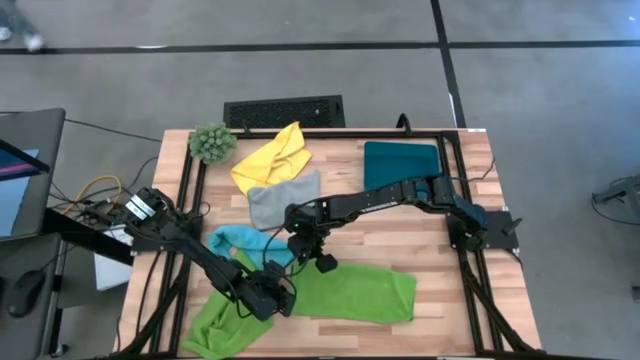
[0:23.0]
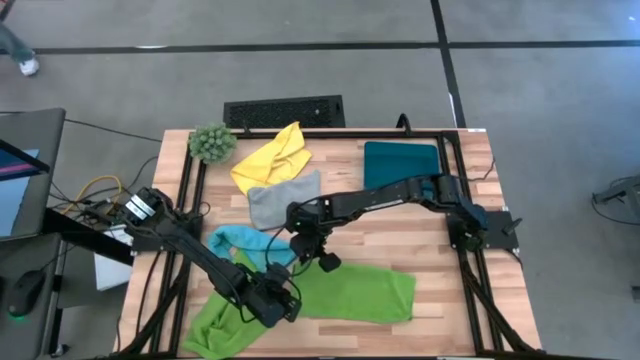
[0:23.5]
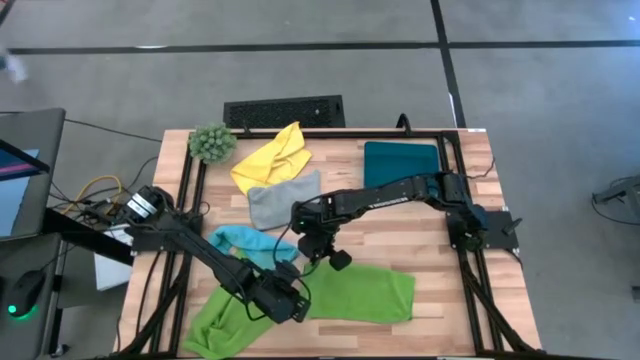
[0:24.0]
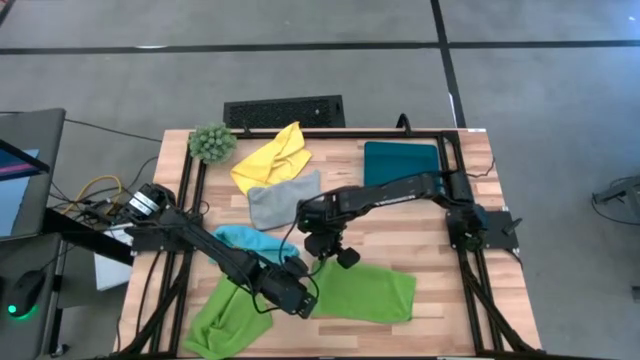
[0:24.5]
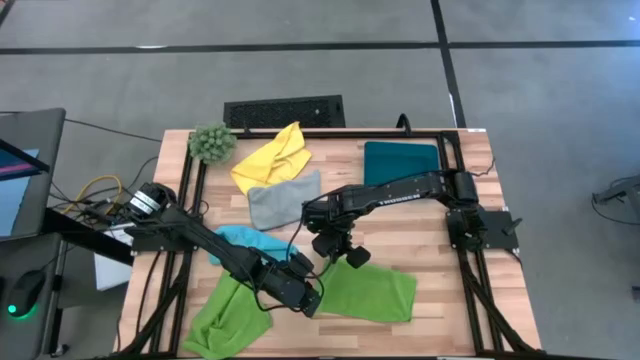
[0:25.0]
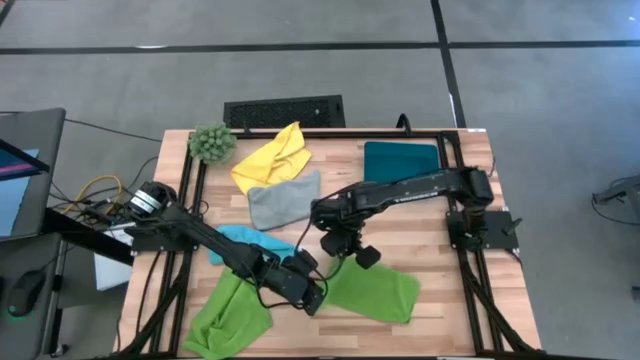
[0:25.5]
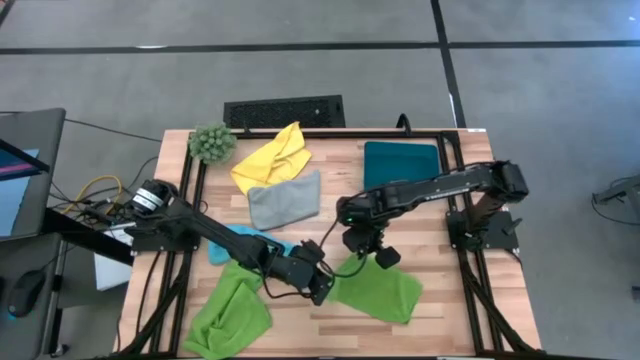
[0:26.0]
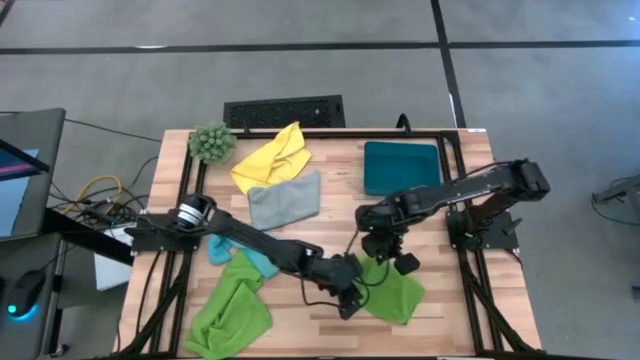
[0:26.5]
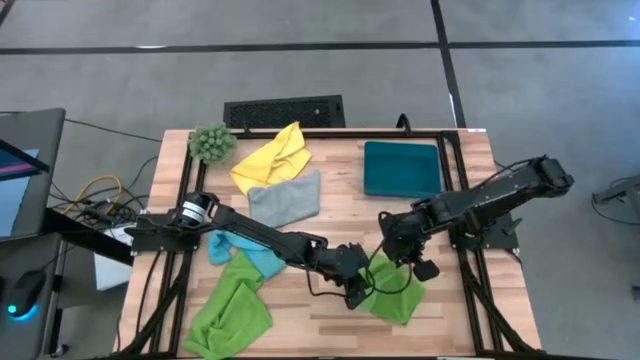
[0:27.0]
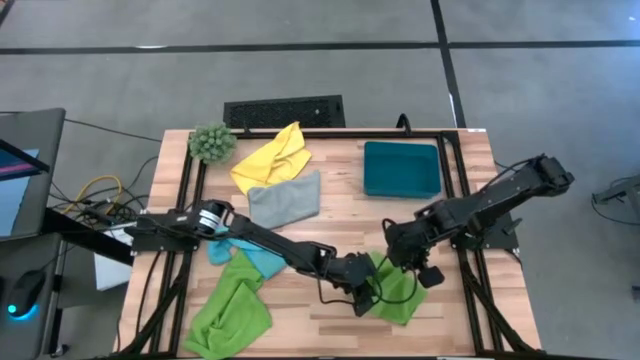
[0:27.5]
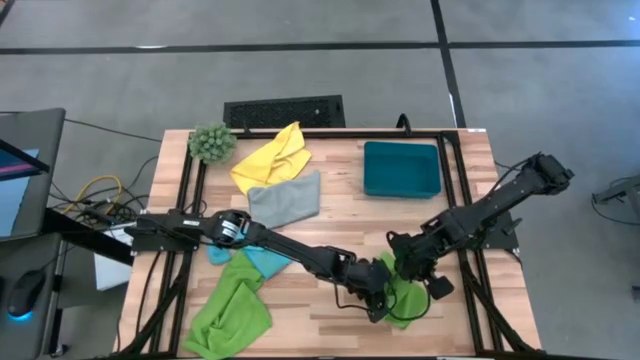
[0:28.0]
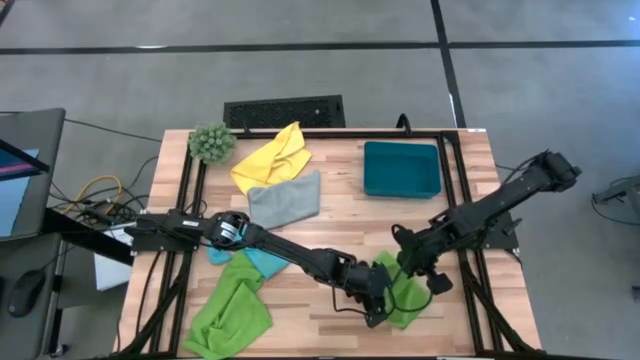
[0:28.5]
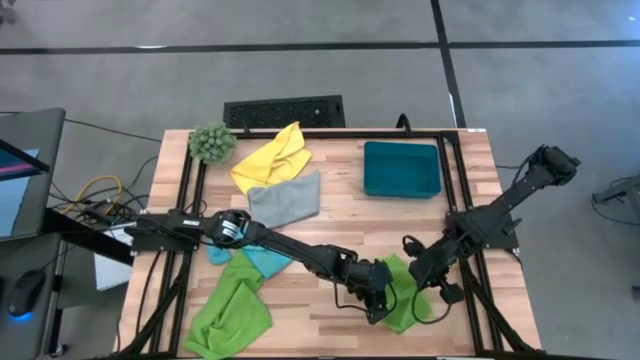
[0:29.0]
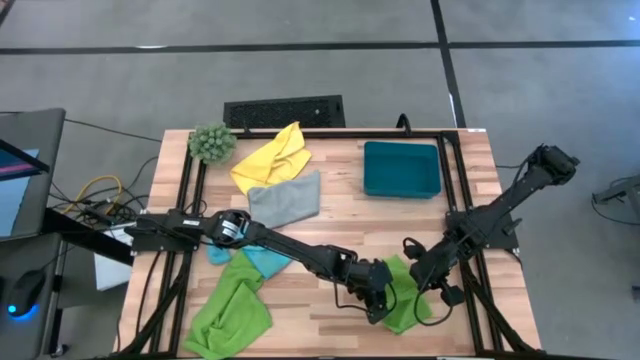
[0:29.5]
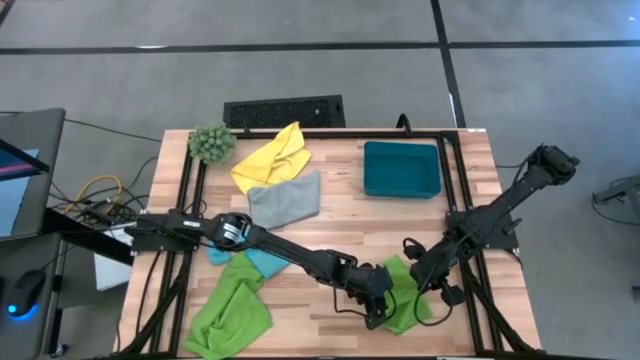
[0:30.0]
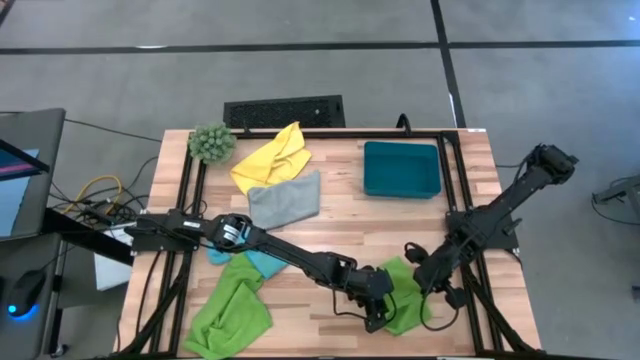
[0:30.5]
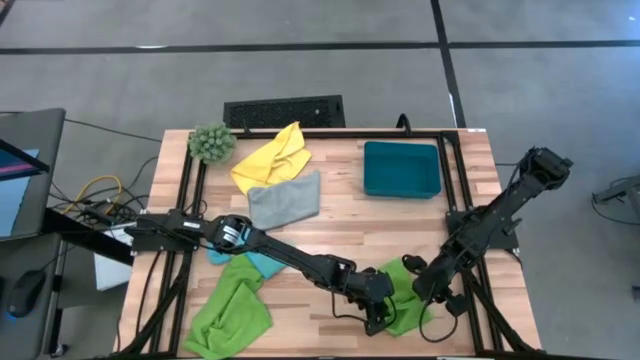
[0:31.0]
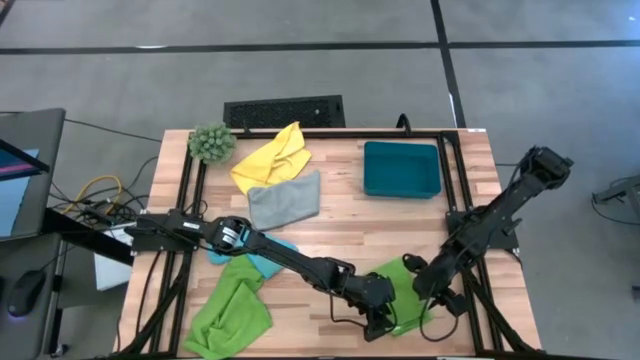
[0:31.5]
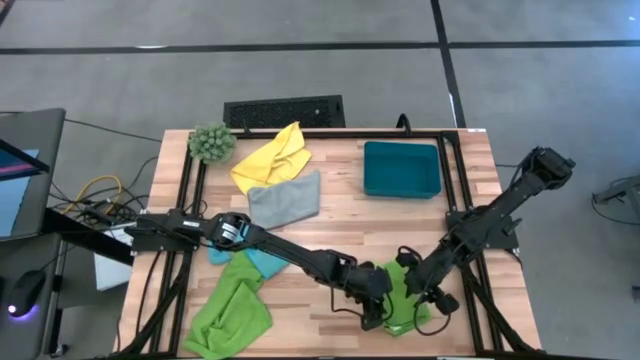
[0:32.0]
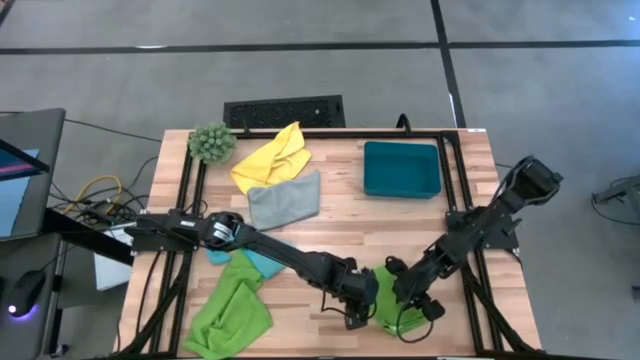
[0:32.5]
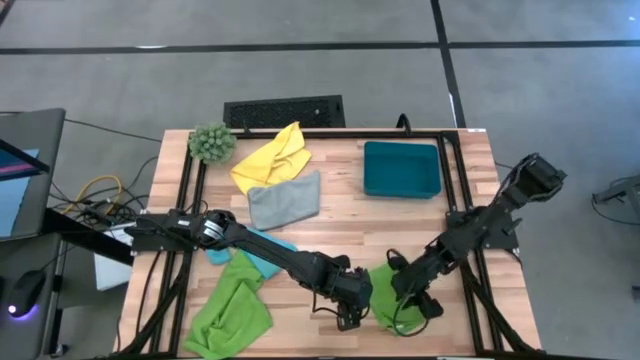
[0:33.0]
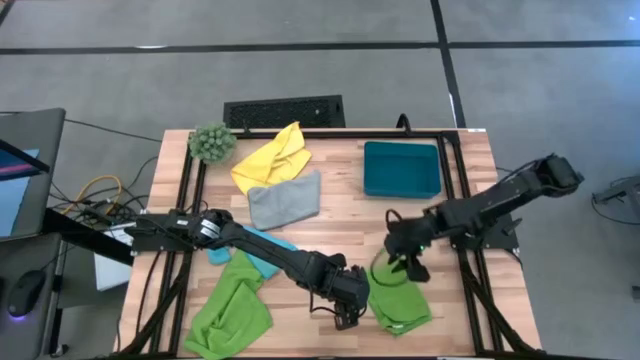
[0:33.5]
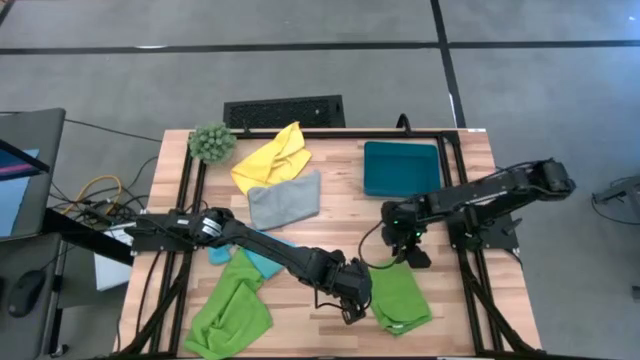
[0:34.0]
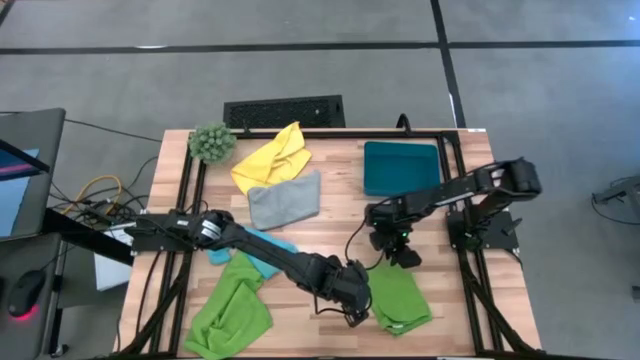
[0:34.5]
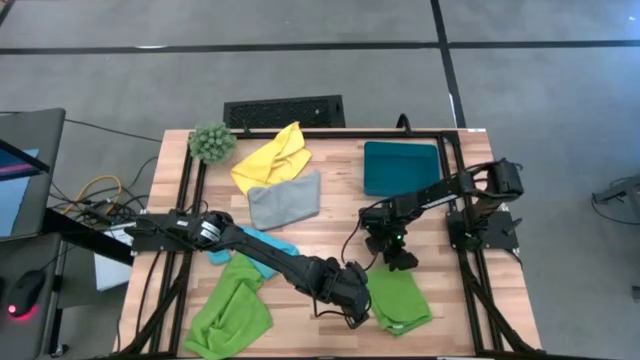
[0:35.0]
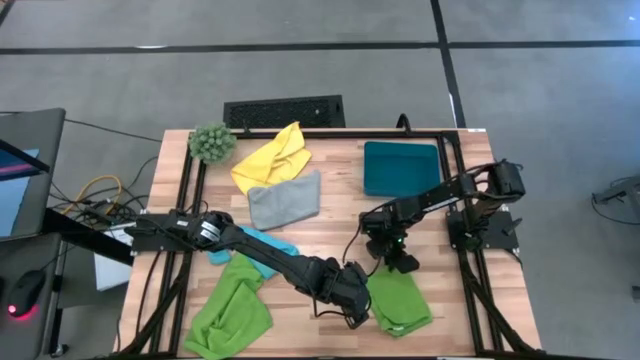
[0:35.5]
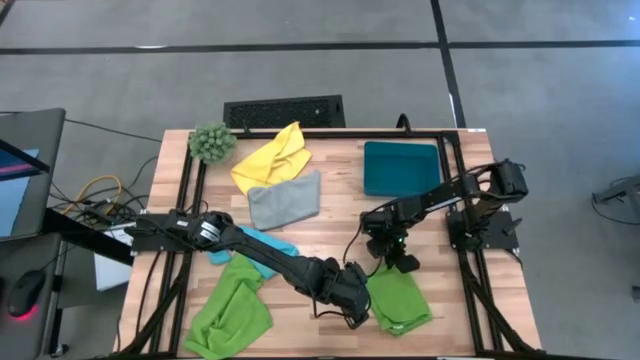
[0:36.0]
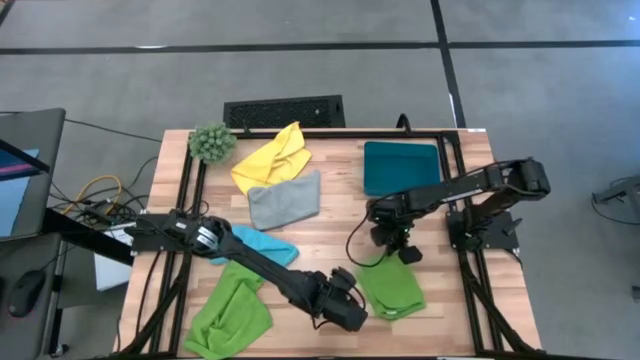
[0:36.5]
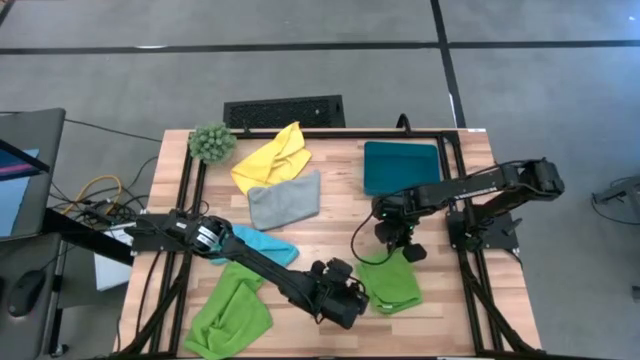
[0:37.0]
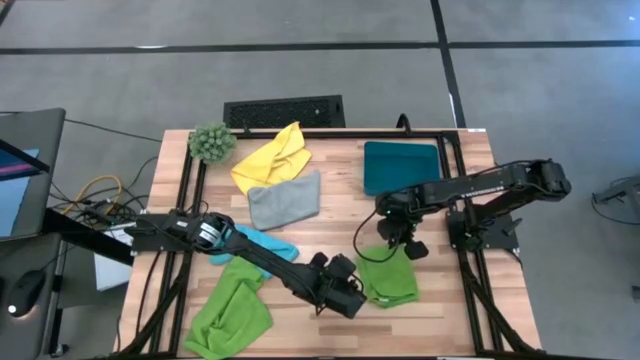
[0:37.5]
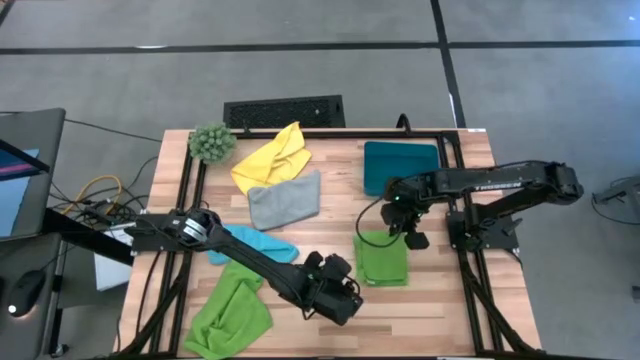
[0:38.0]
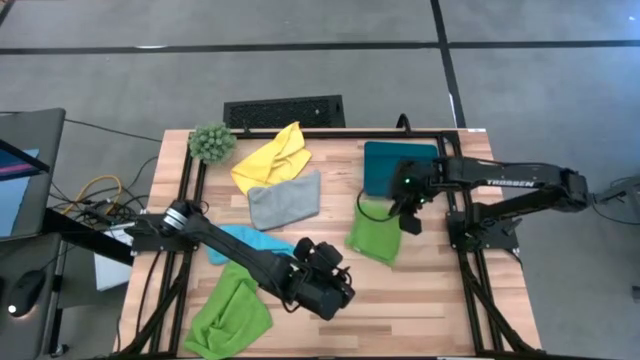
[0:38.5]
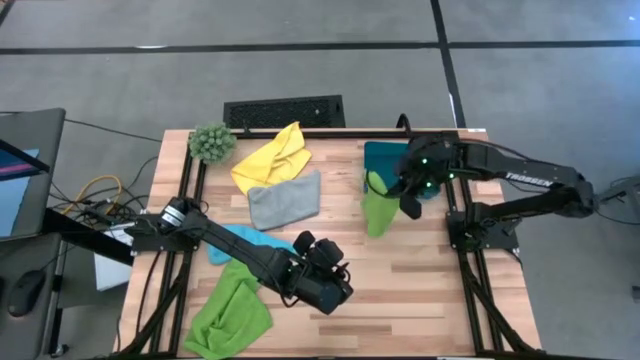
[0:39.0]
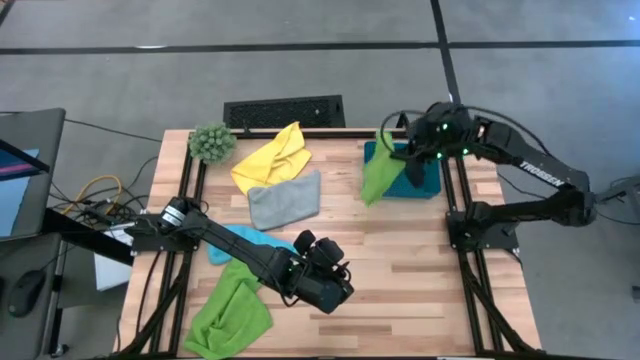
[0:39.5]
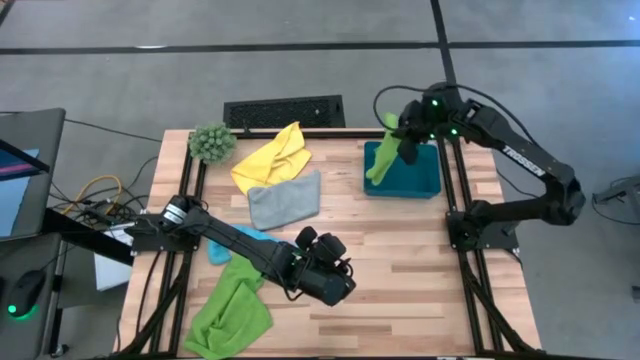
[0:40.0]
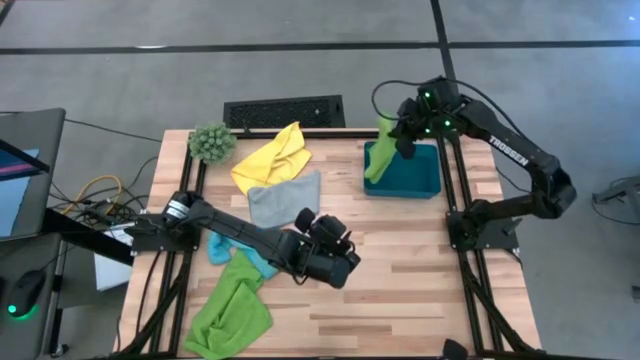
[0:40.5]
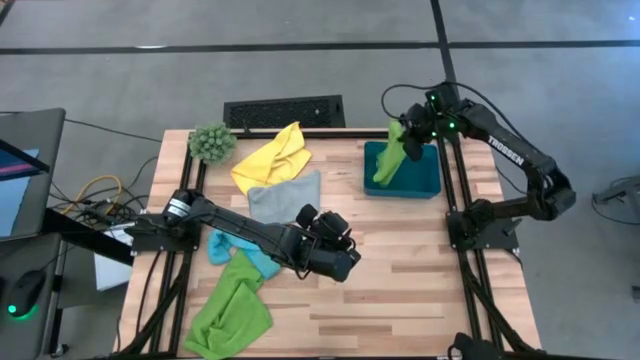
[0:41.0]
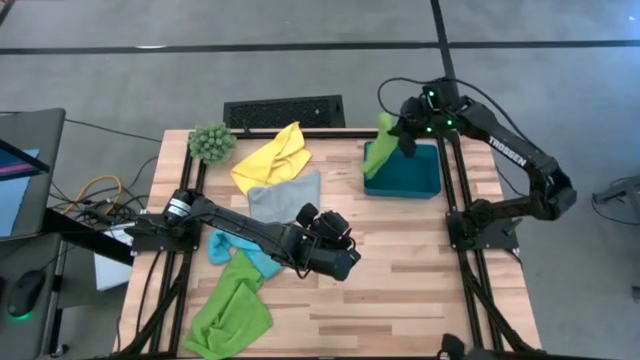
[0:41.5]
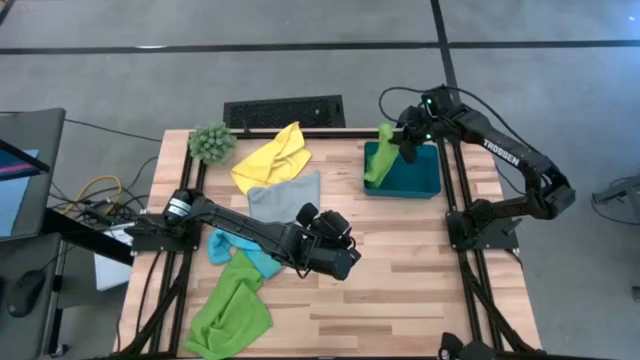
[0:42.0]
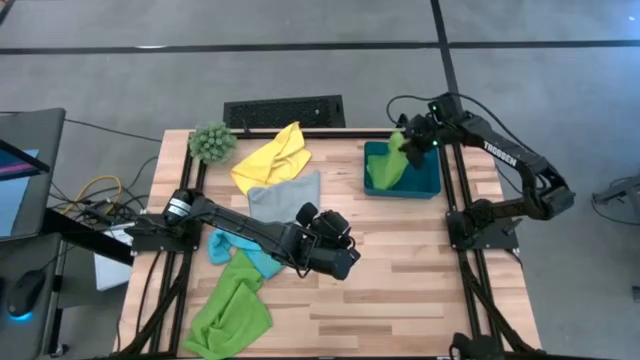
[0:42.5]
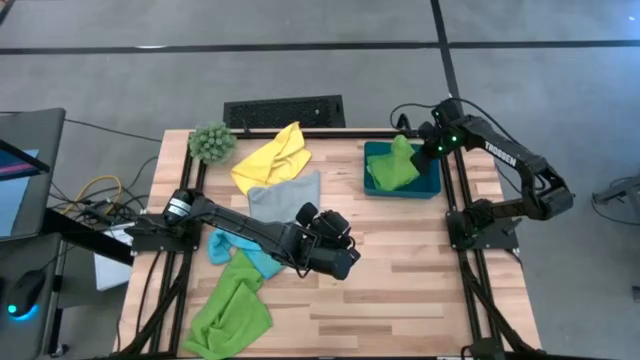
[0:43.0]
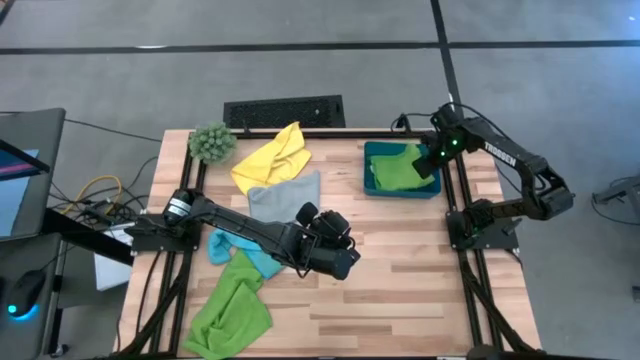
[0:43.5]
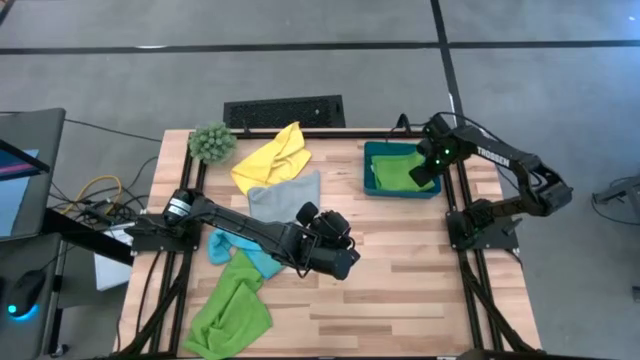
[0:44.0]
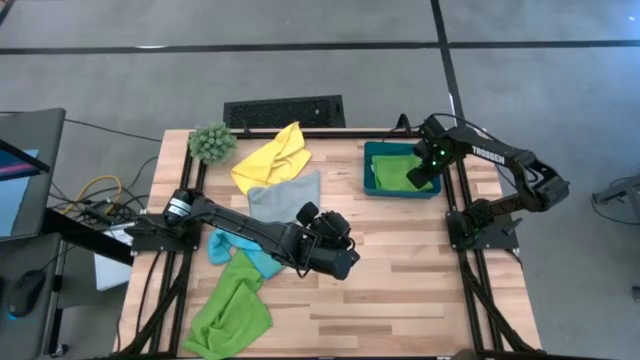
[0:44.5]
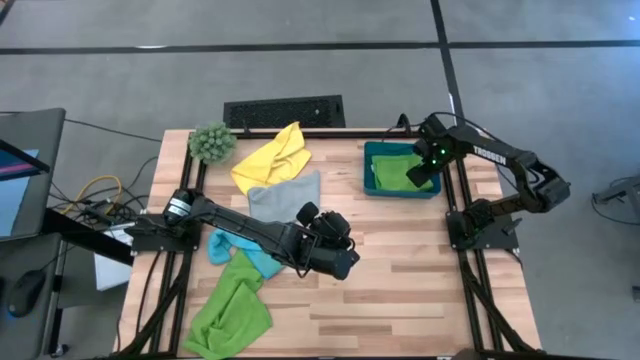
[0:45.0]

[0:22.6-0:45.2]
Task: Fold microfiber towels
Fold the right green microfiber cloth
